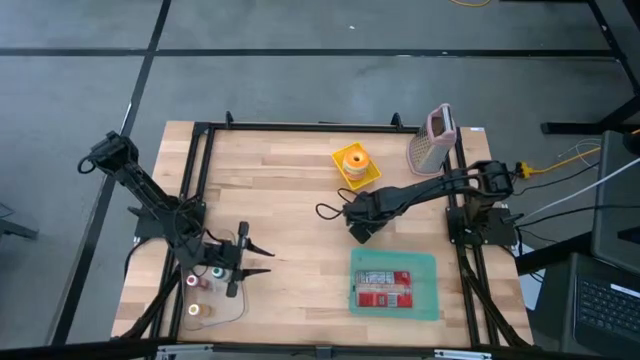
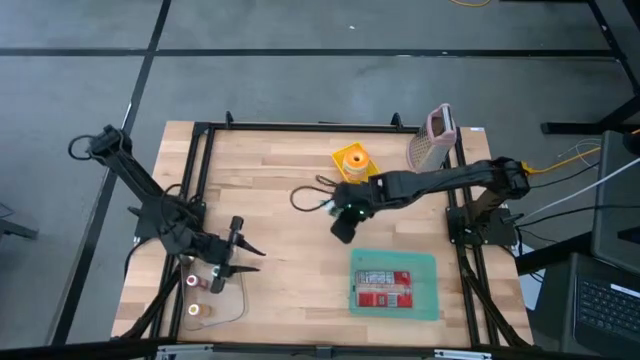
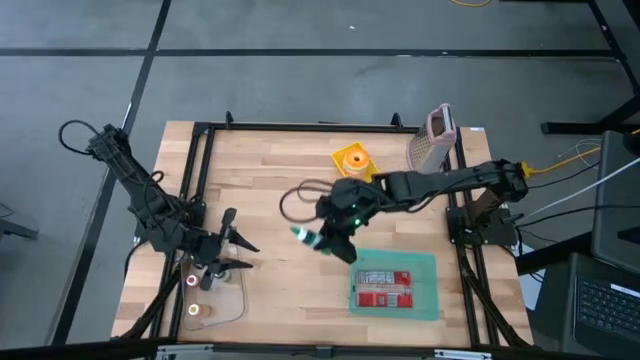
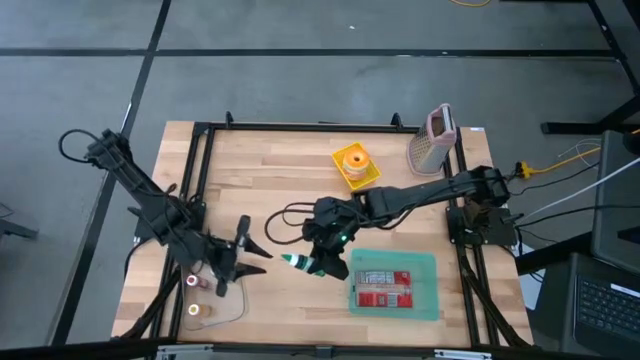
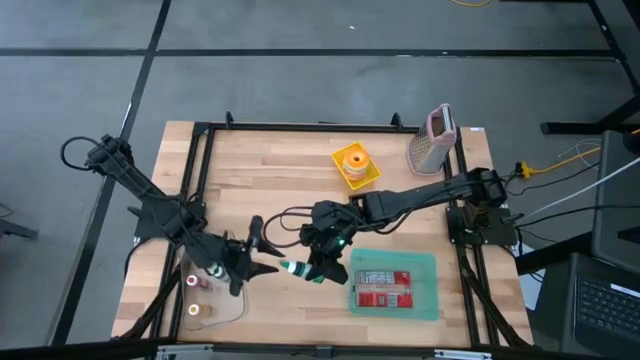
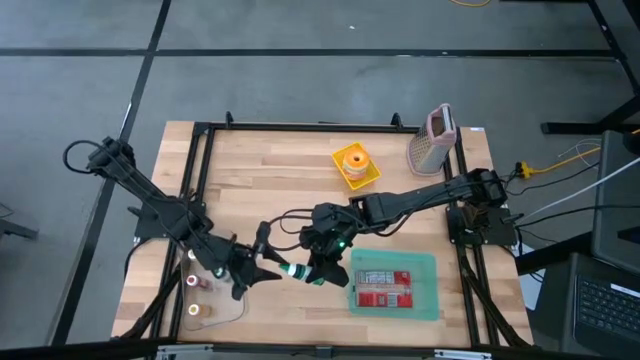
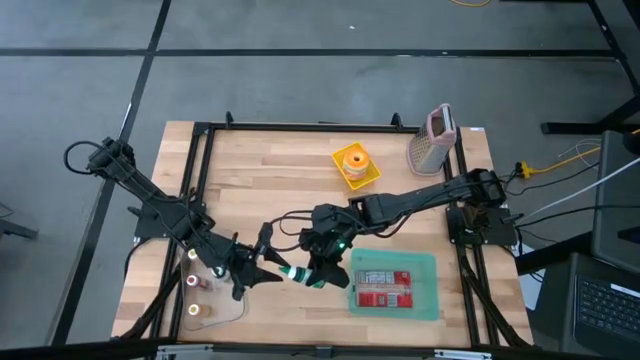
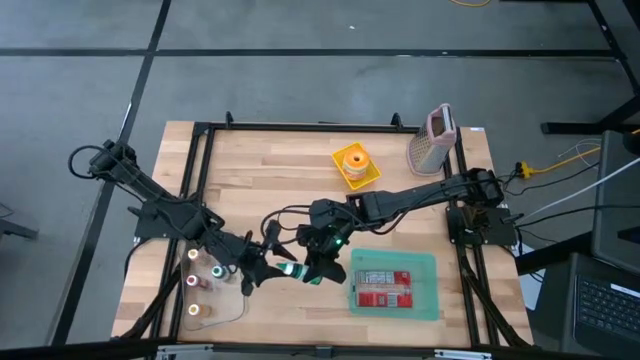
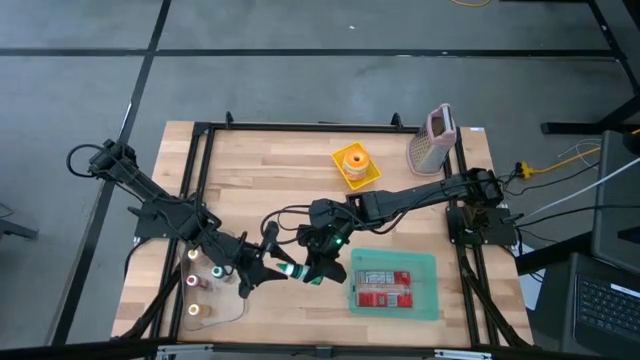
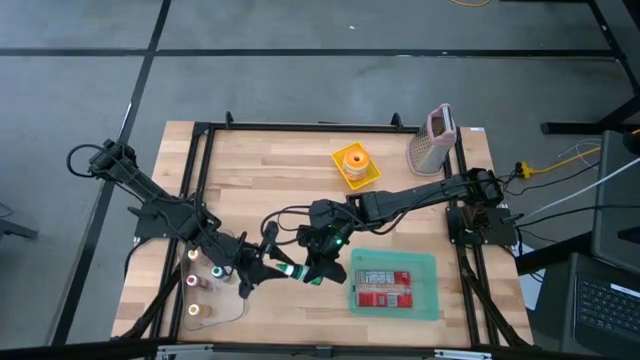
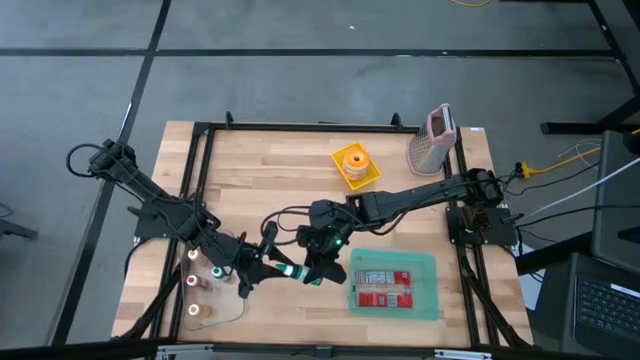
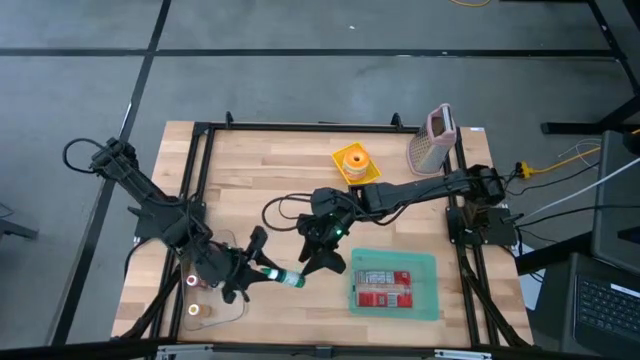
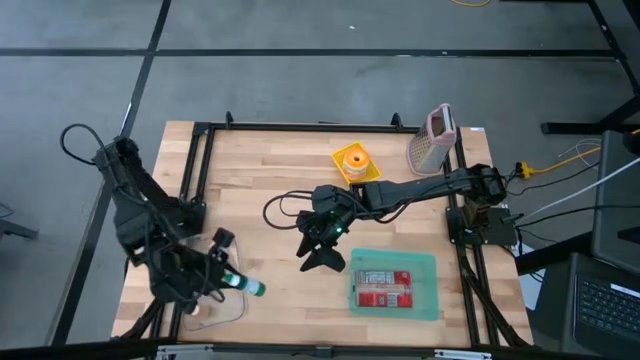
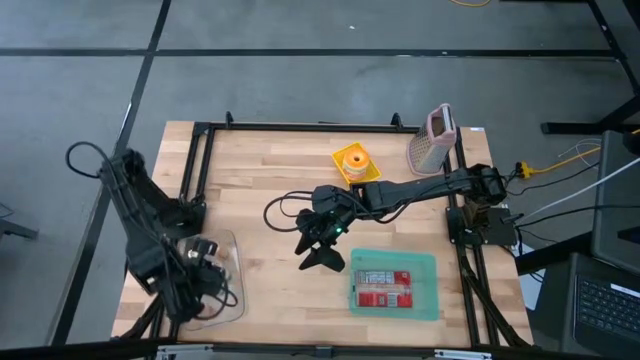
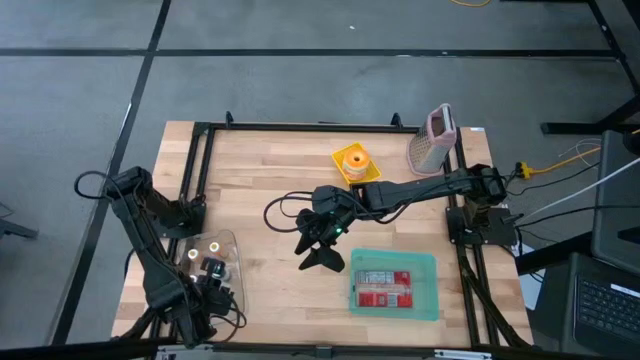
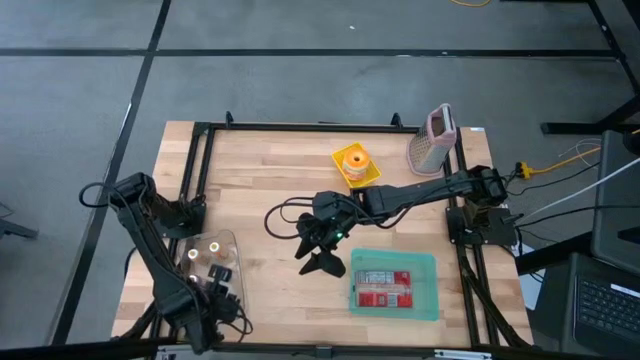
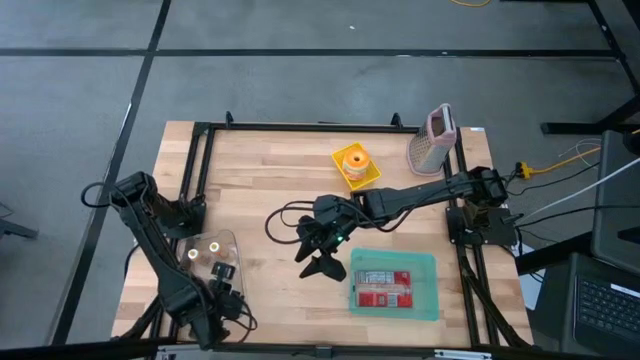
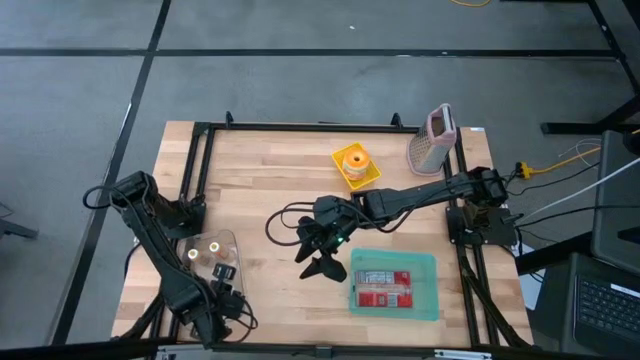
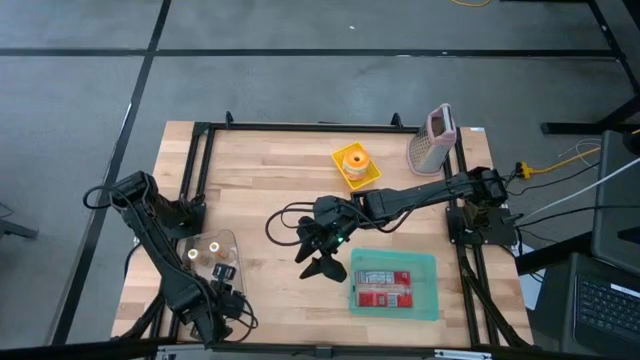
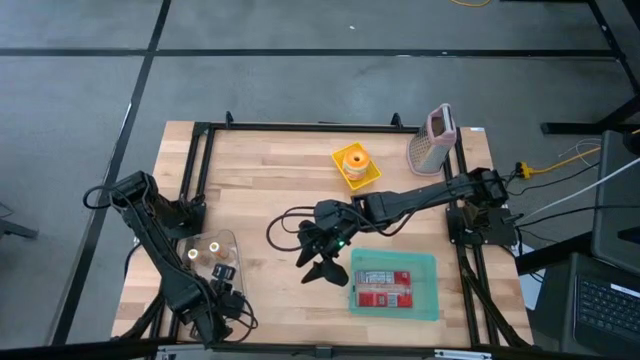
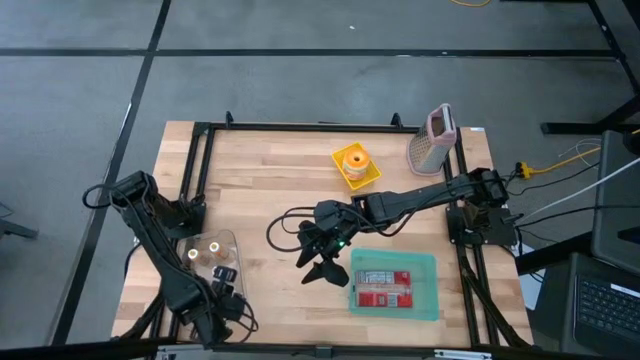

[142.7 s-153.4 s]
Put the green food coloring bottle into the transparent bin

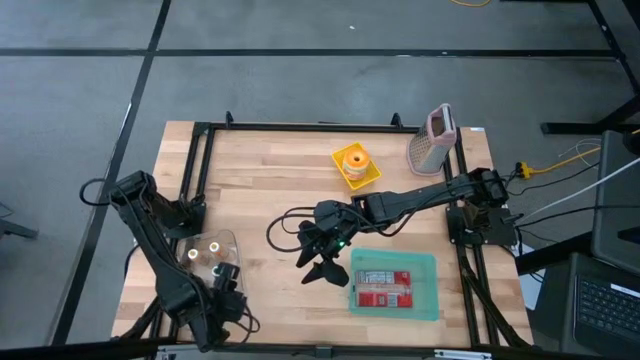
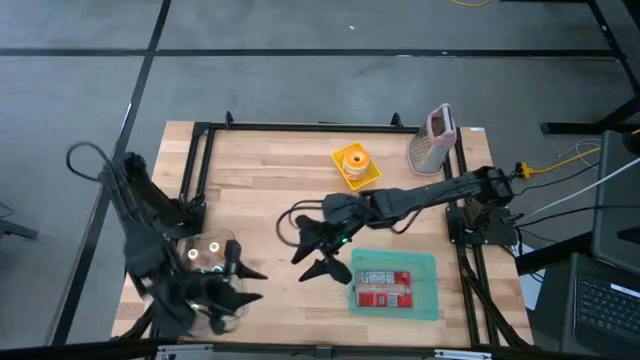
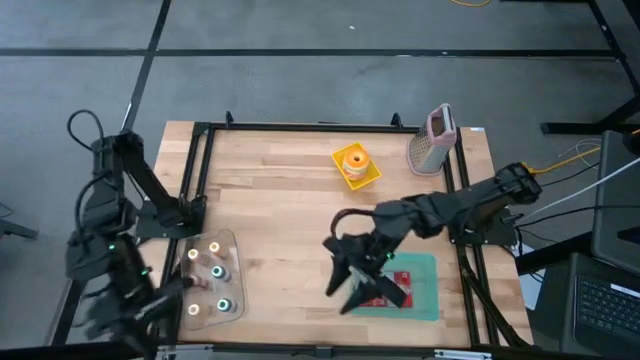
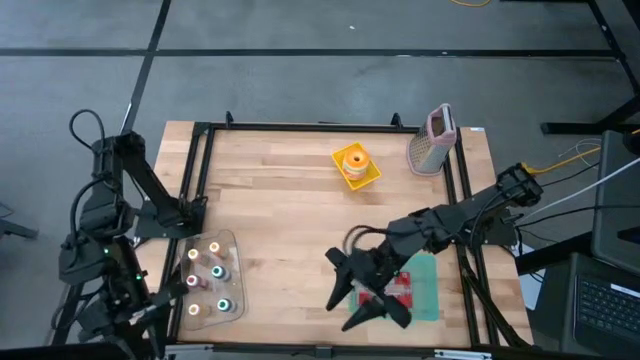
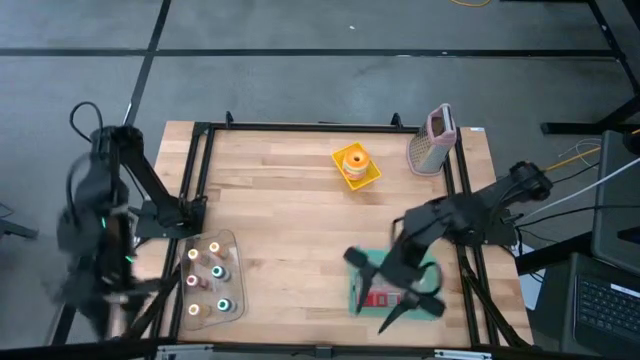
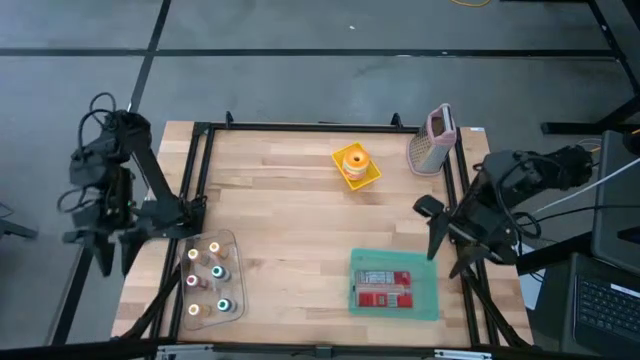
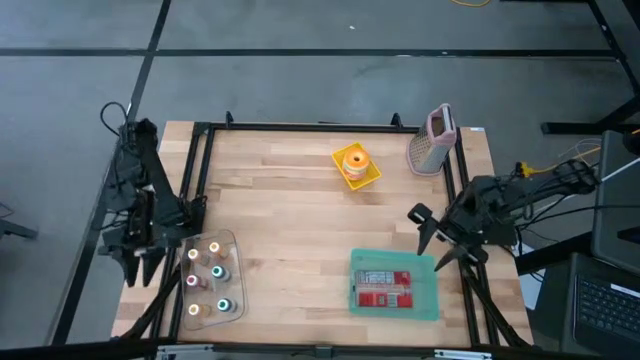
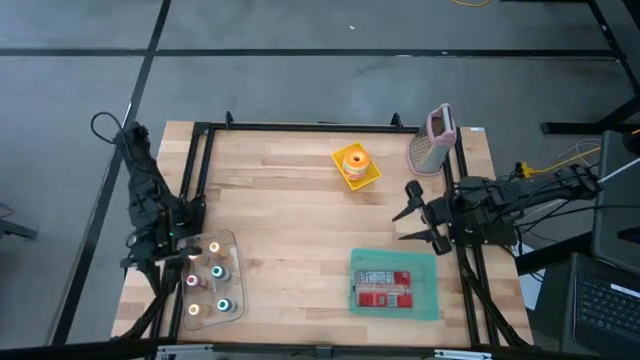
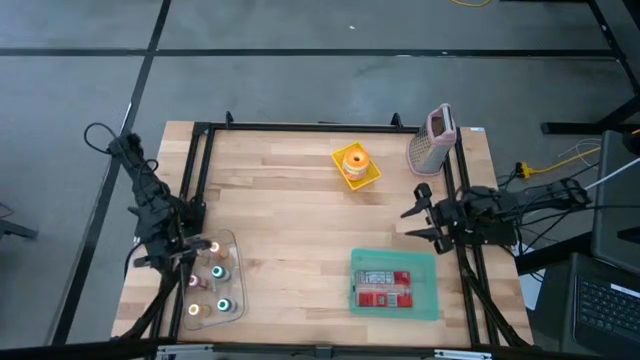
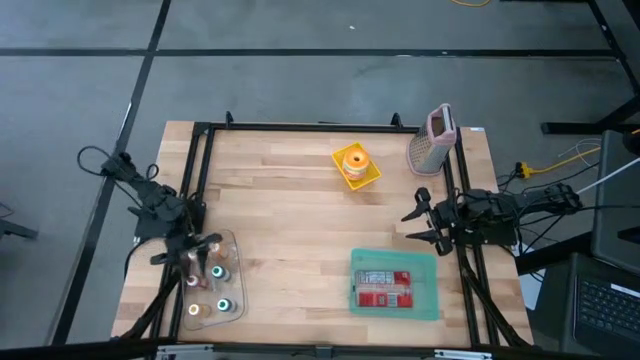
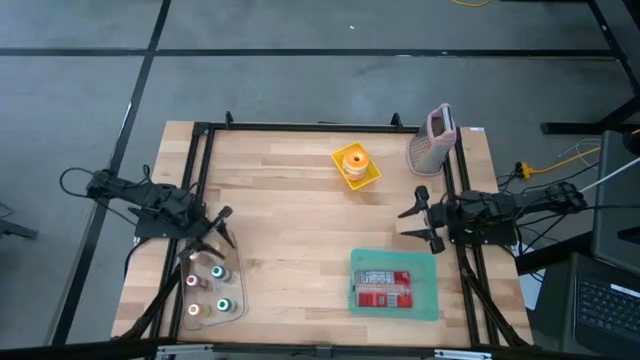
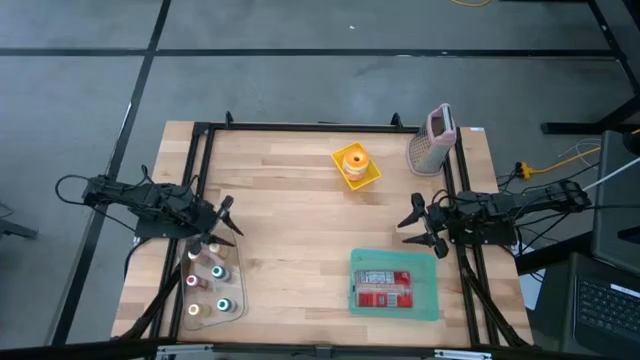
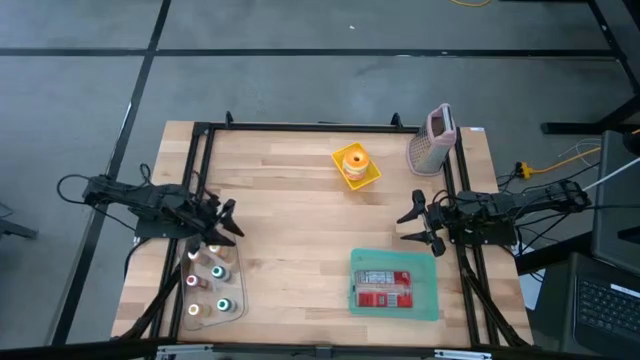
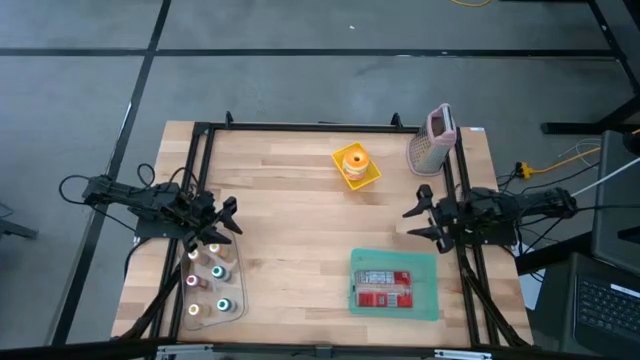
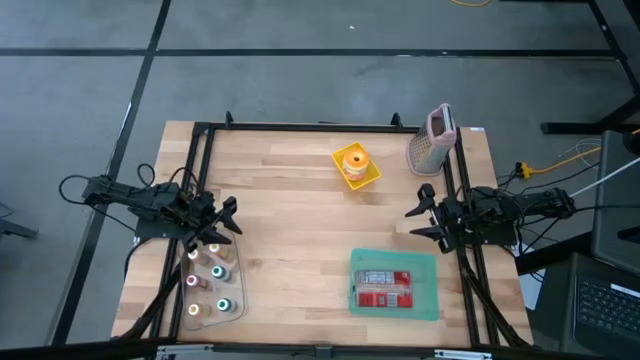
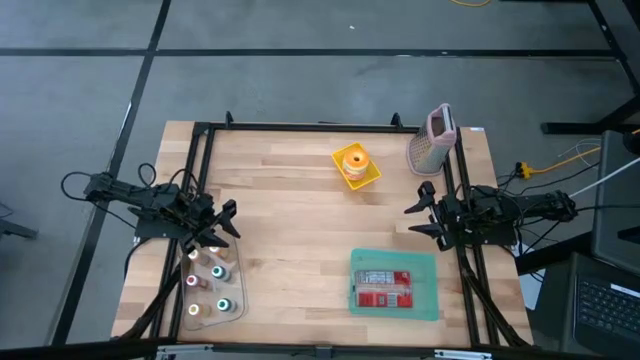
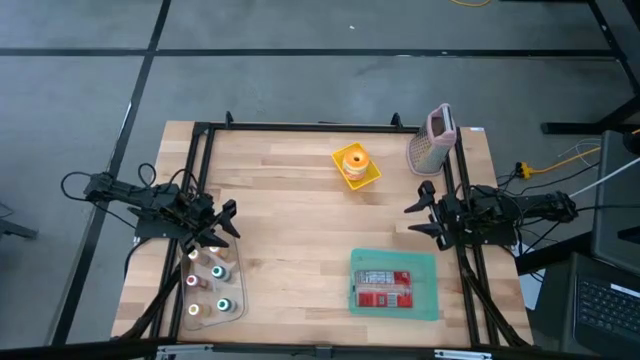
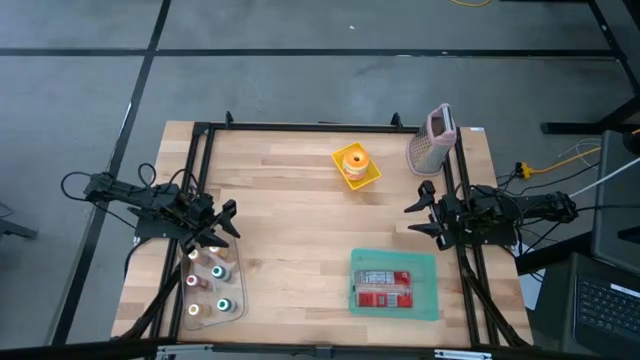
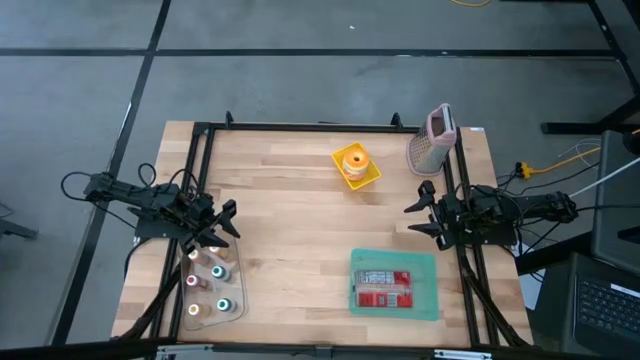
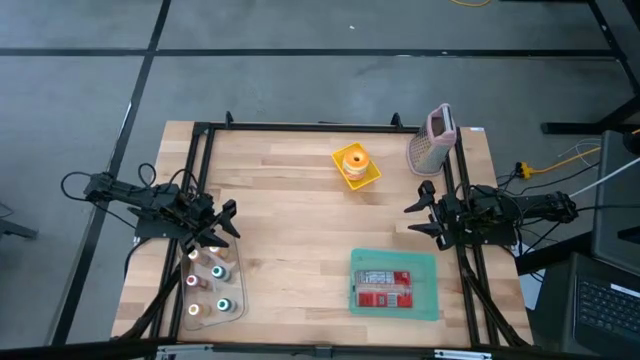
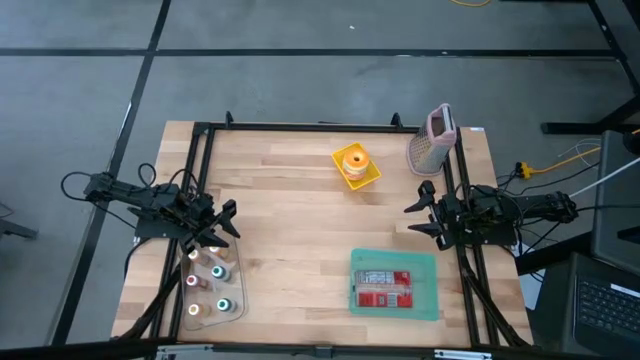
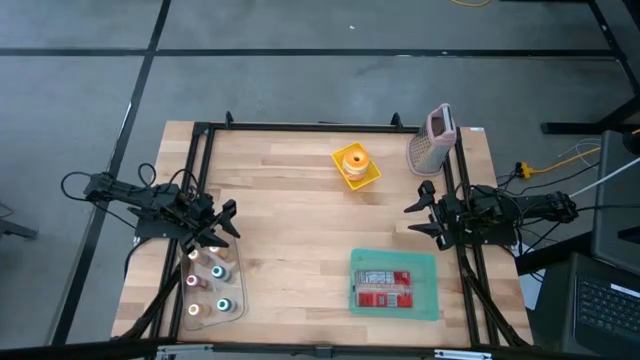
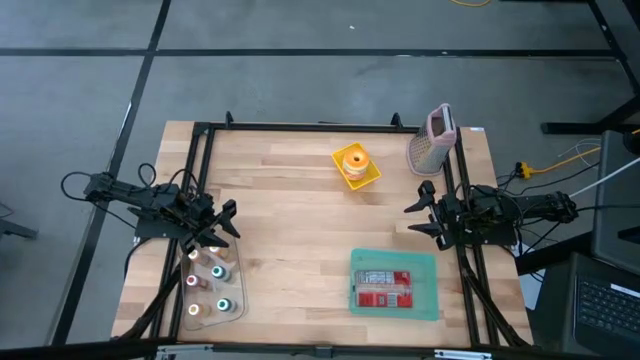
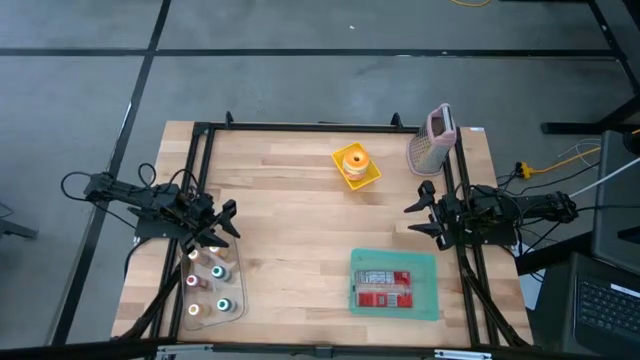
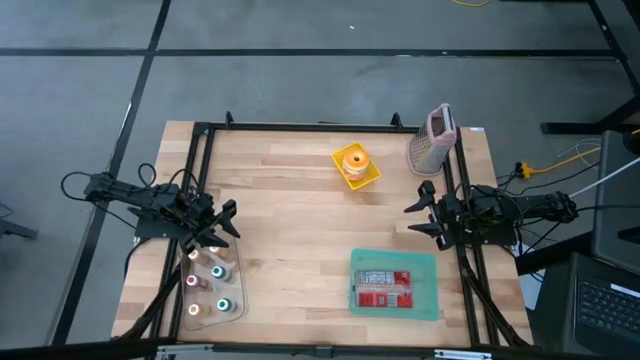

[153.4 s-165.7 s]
Return to Home Position
